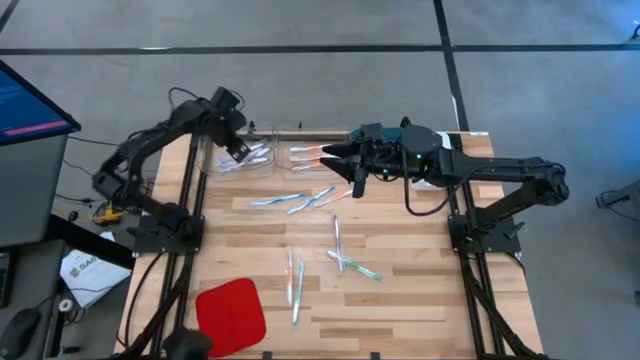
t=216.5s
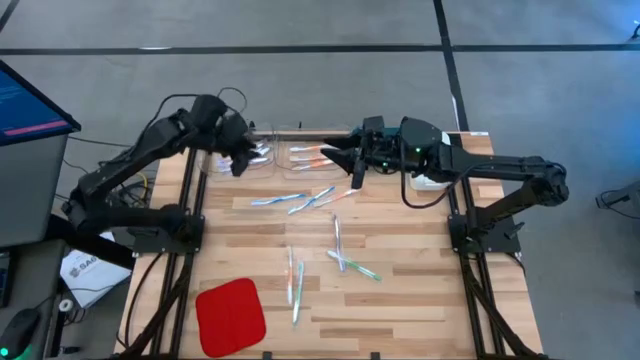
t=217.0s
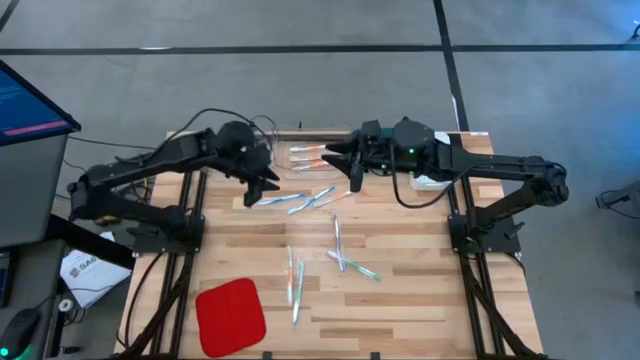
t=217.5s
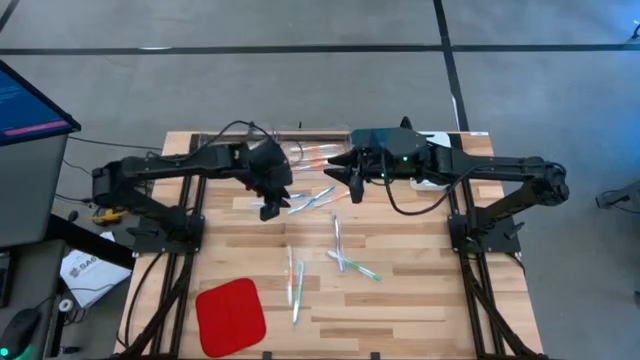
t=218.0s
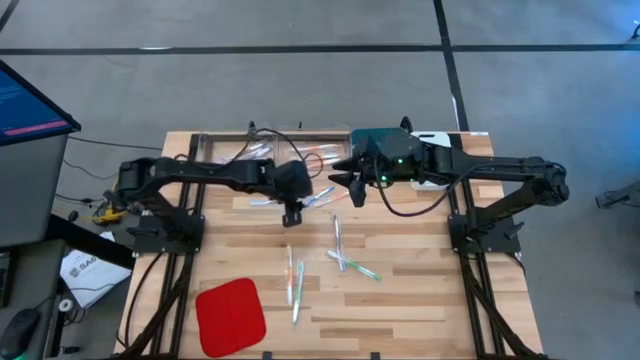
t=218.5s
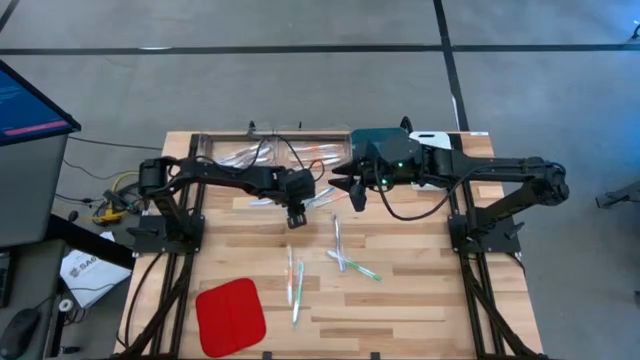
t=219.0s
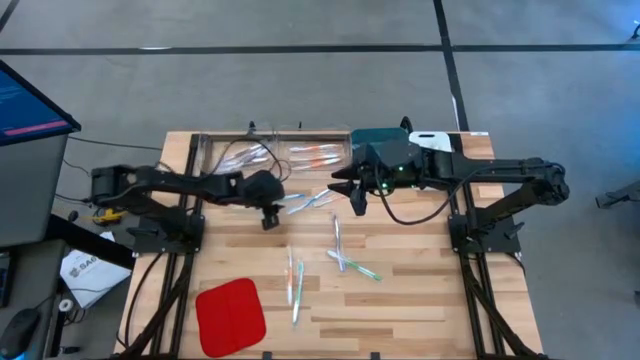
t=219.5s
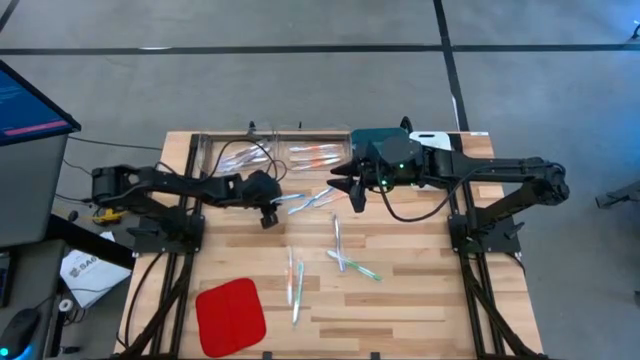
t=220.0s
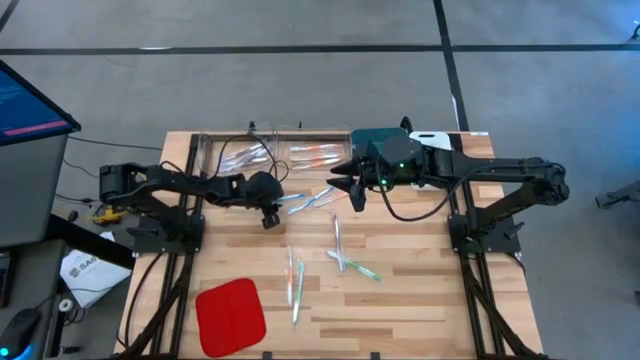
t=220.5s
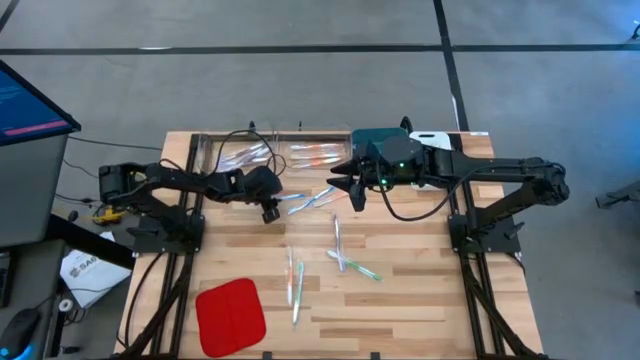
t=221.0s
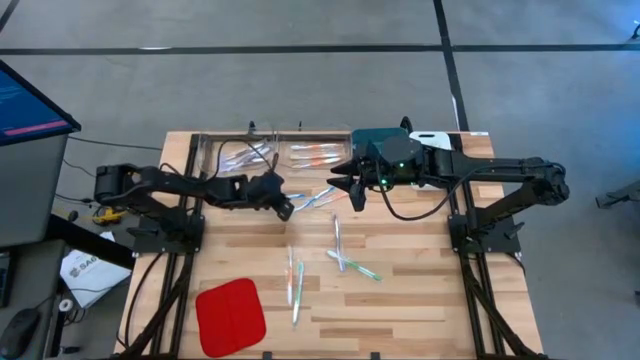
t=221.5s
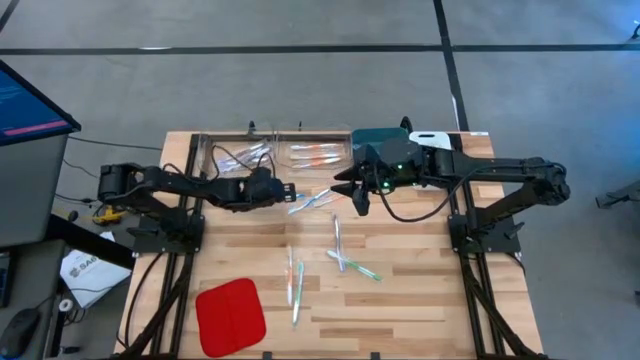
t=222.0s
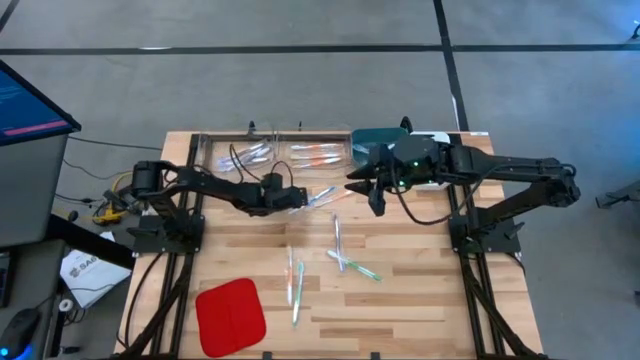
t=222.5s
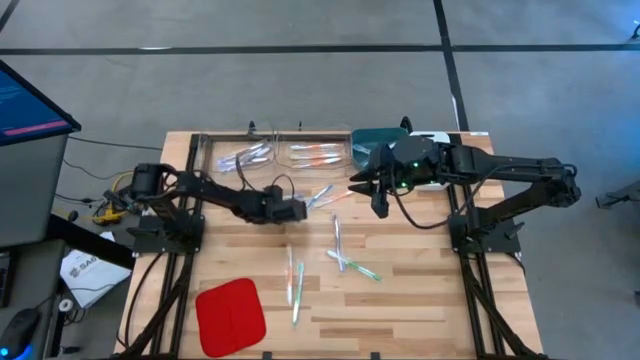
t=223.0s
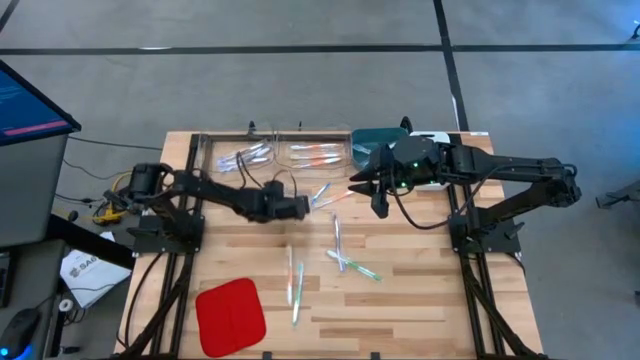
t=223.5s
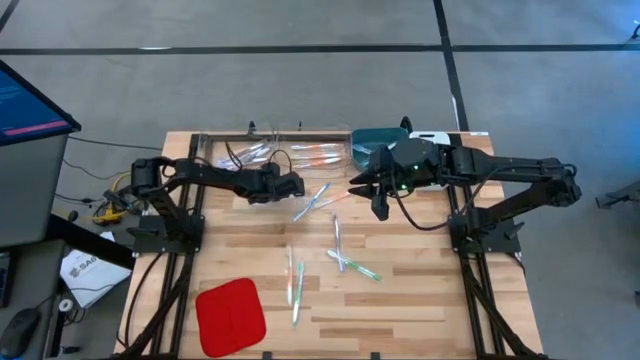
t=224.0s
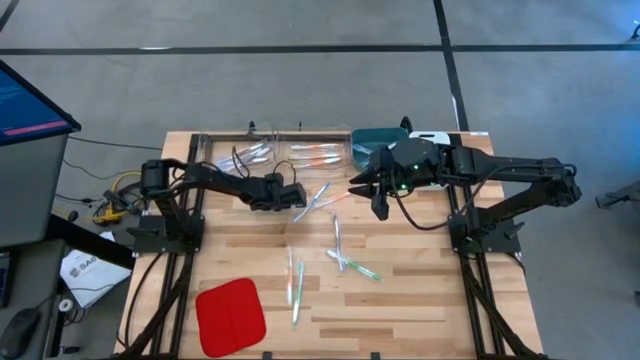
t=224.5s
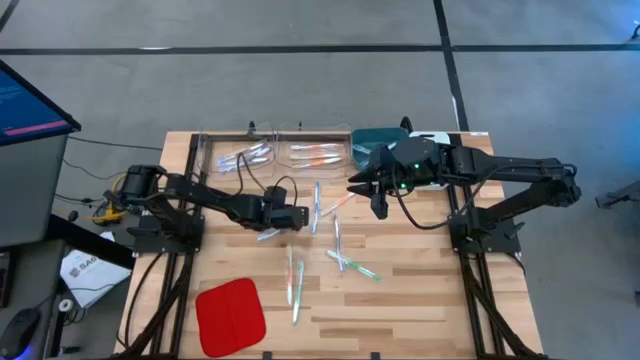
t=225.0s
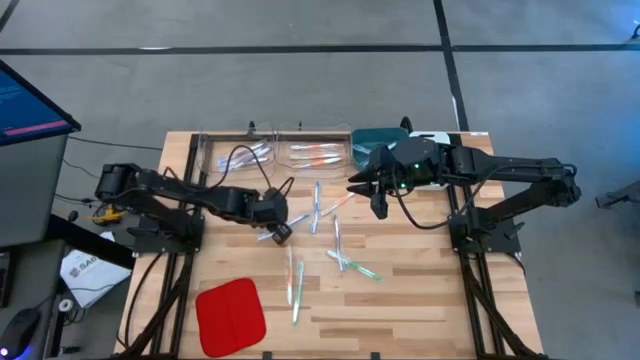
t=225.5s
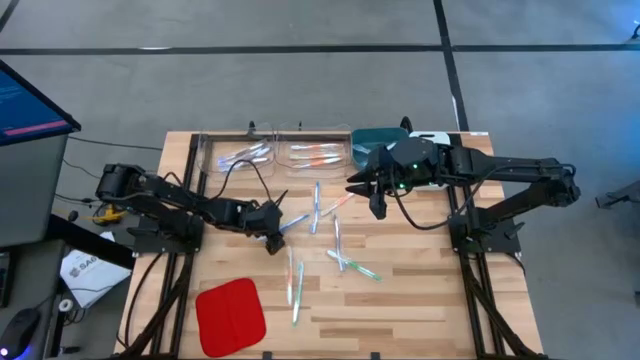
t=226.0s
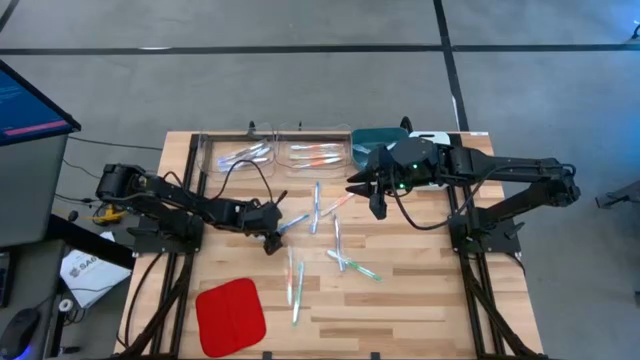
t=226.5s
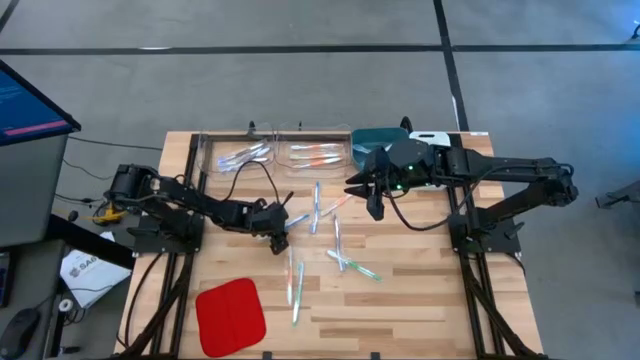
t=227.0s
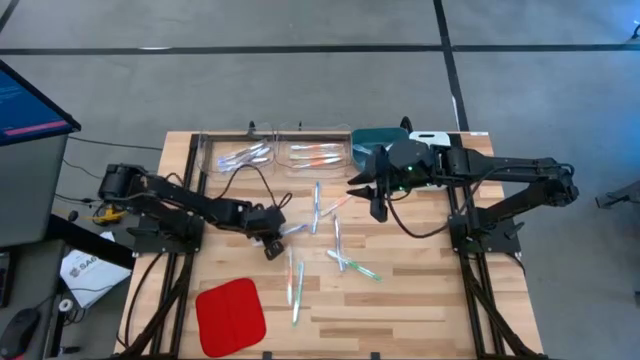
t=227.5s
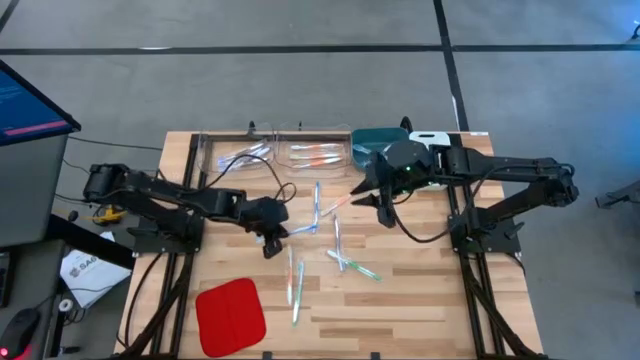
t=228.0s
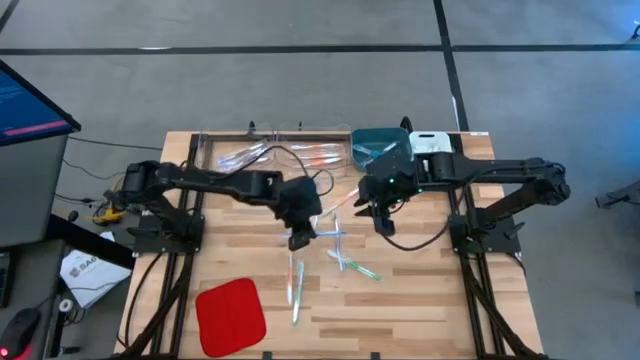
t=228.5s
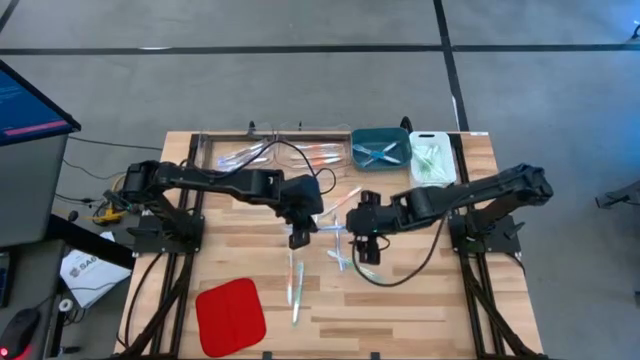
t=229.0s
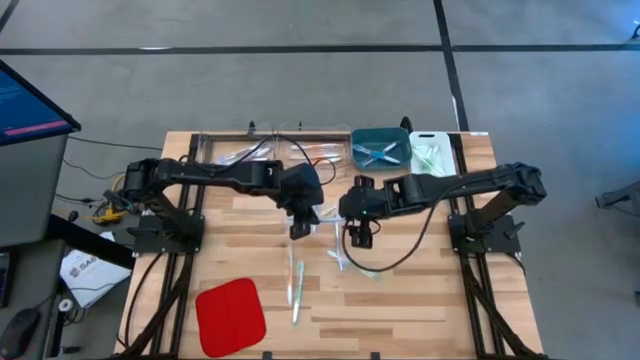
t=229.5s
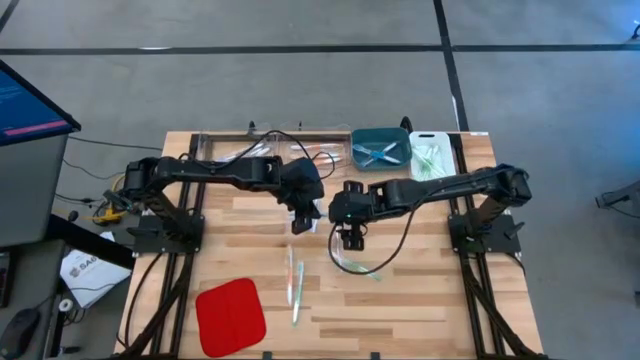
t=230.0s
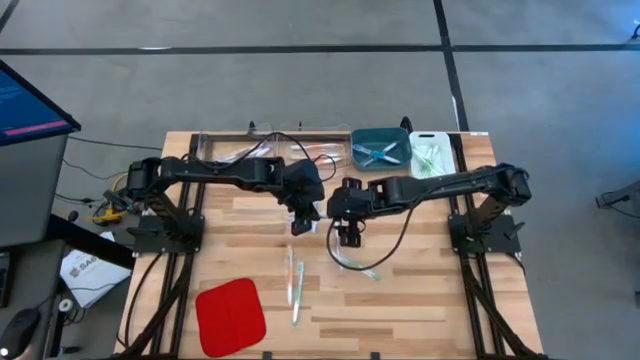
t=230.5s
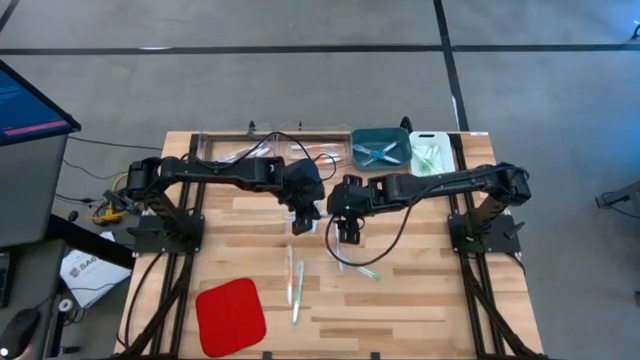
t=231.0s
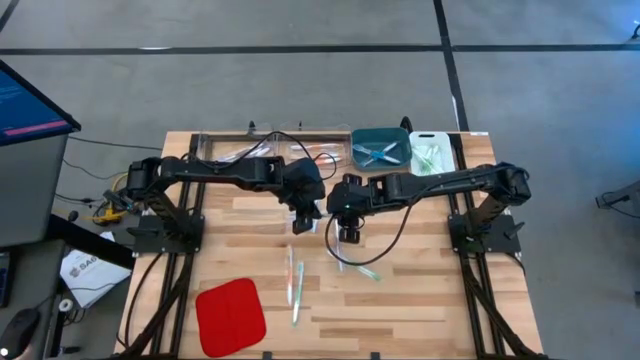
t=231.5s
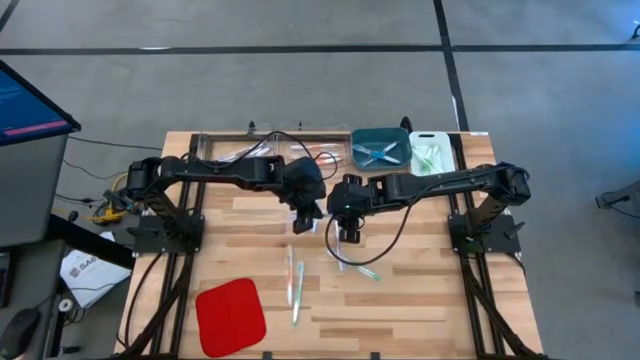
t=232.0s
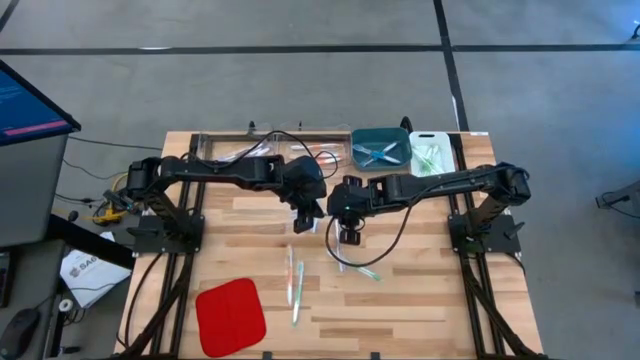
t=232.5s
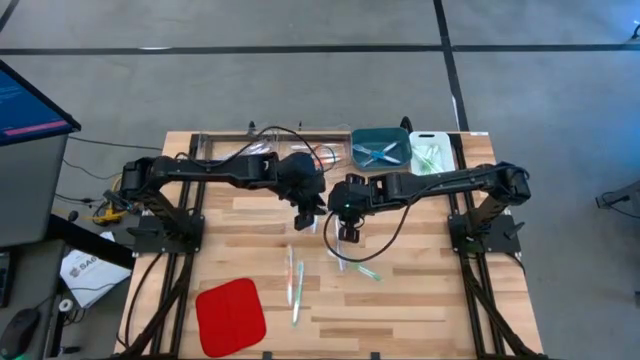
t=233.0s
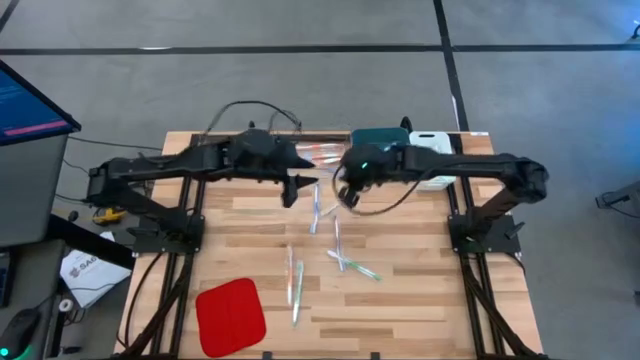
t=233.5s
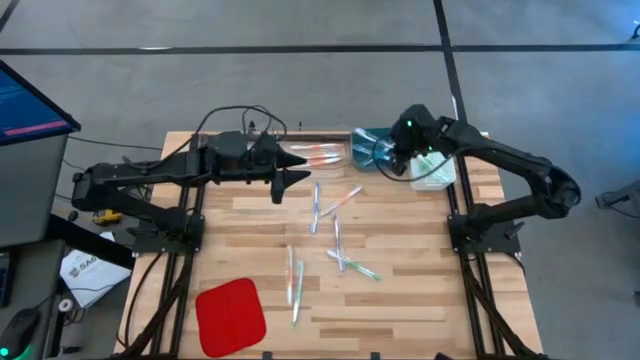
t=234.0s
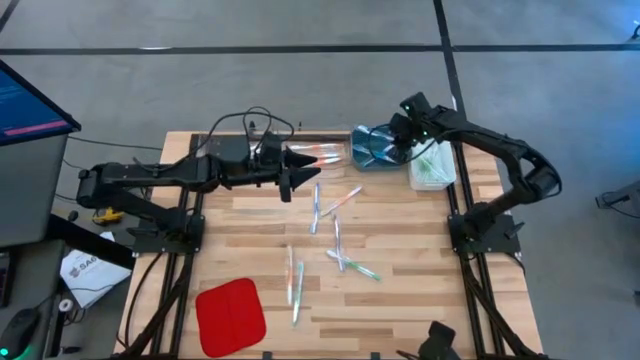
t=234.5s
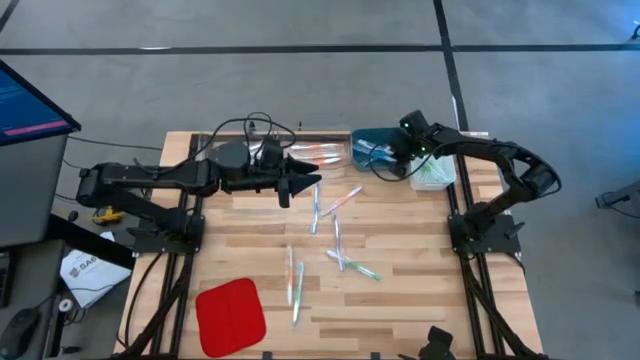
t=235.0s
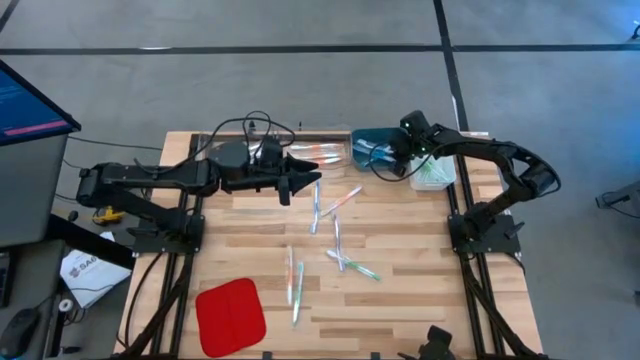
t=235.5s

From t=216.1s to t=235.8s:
Task: Pick & Place Toothbrushes
Put the blue toothbrush into the blue bin
